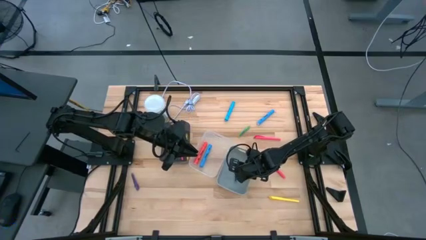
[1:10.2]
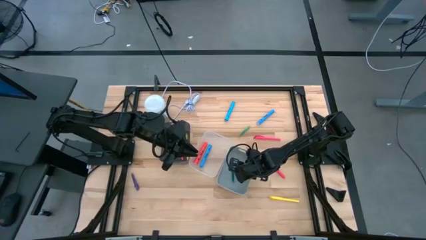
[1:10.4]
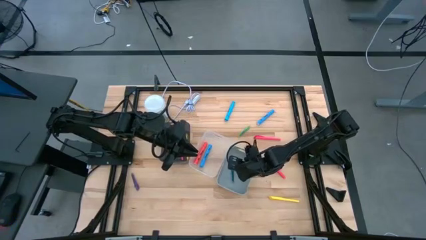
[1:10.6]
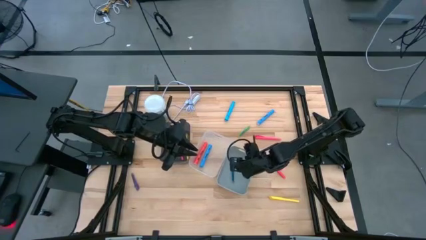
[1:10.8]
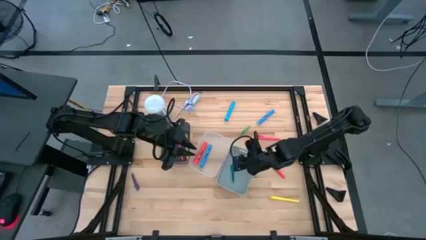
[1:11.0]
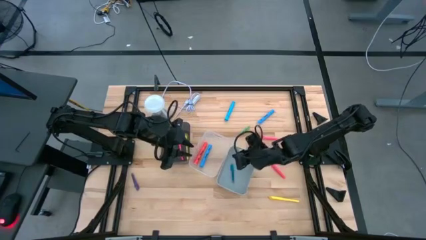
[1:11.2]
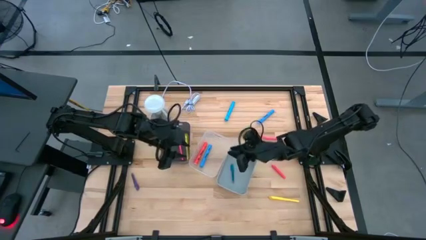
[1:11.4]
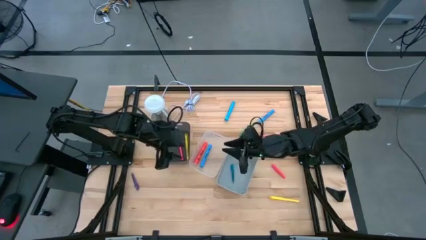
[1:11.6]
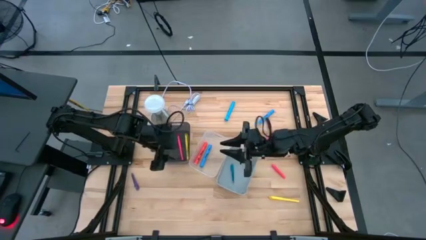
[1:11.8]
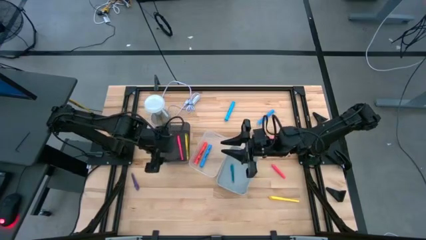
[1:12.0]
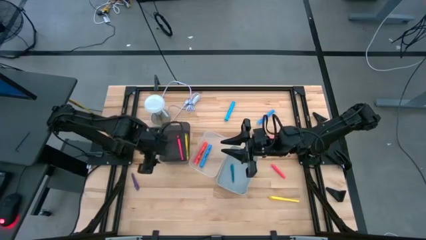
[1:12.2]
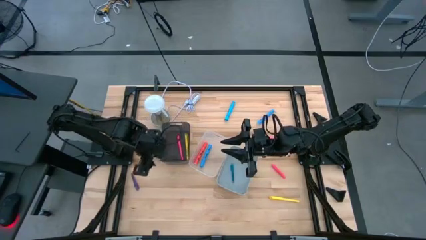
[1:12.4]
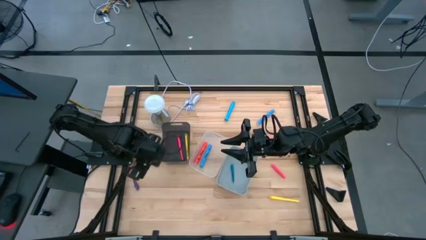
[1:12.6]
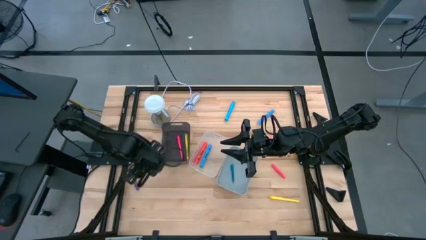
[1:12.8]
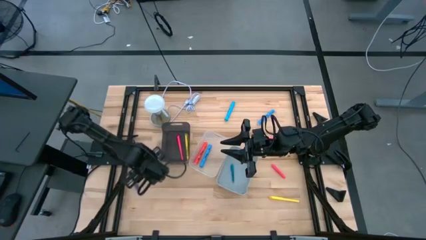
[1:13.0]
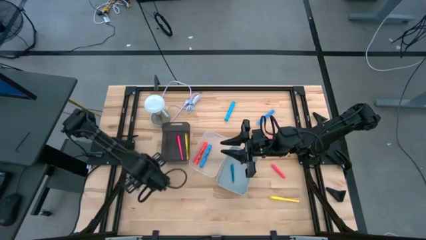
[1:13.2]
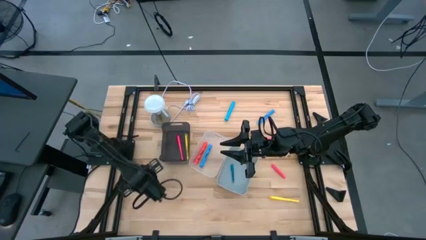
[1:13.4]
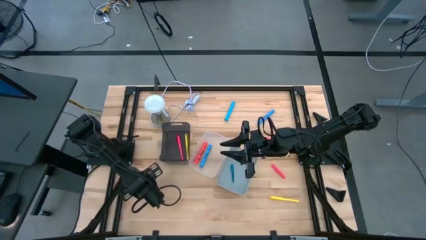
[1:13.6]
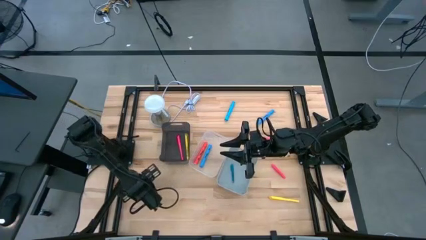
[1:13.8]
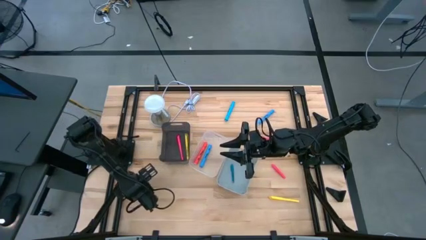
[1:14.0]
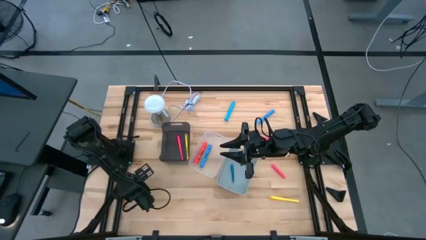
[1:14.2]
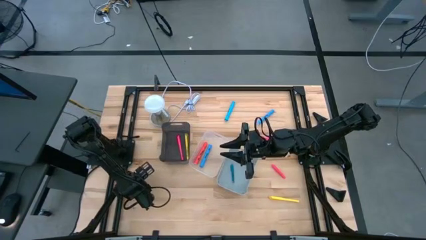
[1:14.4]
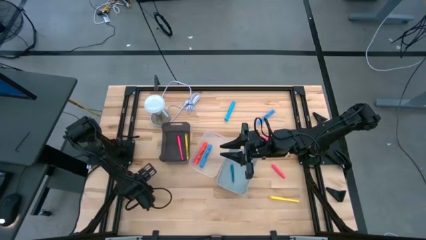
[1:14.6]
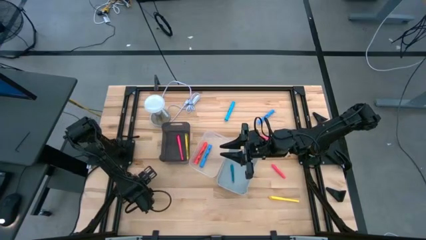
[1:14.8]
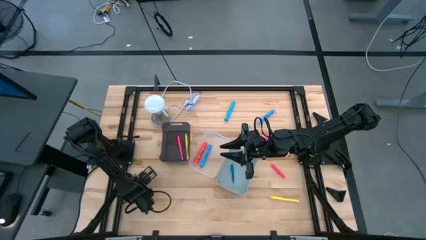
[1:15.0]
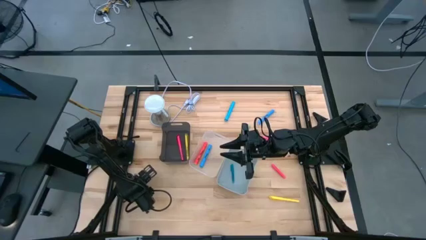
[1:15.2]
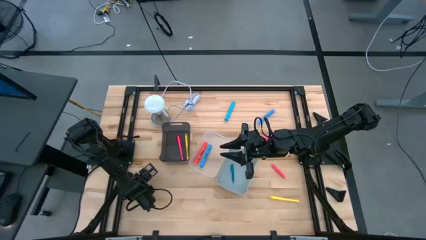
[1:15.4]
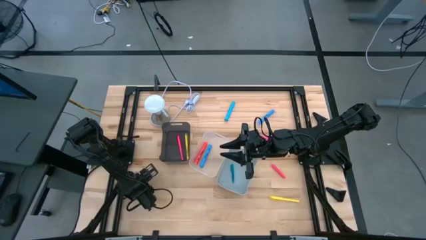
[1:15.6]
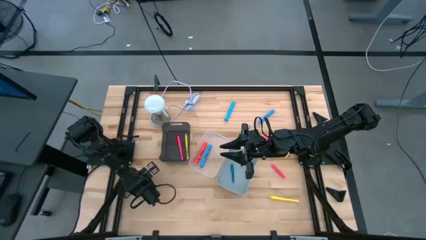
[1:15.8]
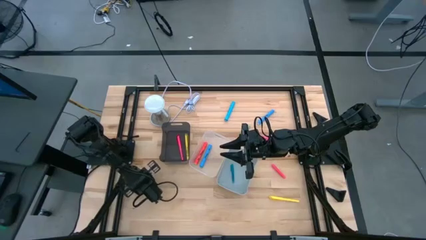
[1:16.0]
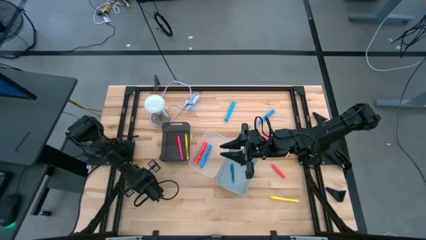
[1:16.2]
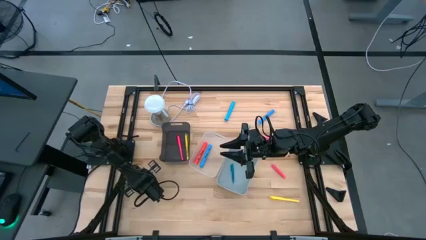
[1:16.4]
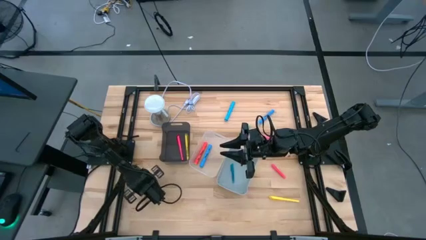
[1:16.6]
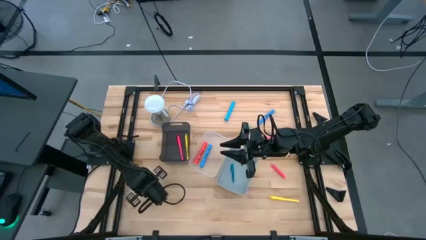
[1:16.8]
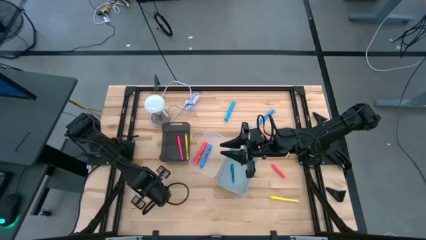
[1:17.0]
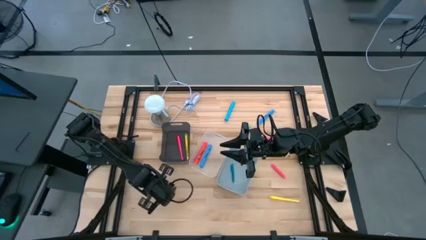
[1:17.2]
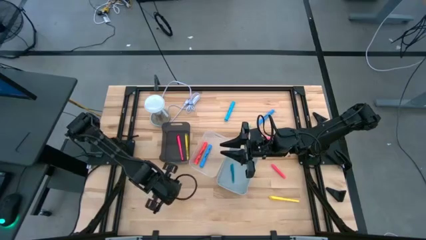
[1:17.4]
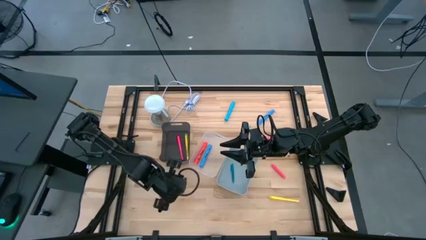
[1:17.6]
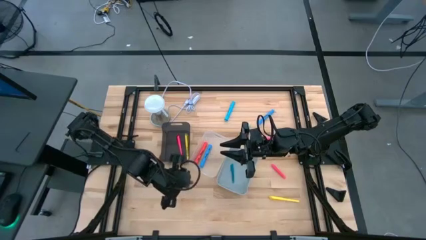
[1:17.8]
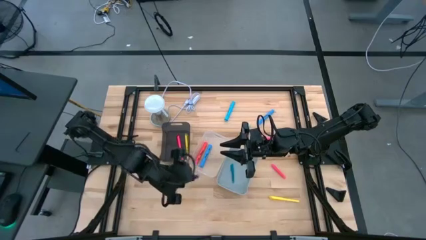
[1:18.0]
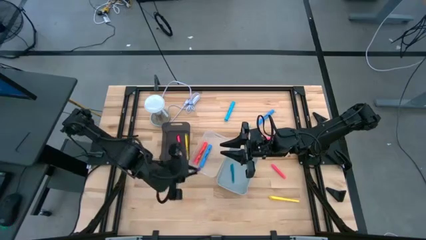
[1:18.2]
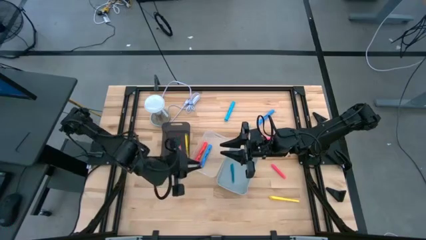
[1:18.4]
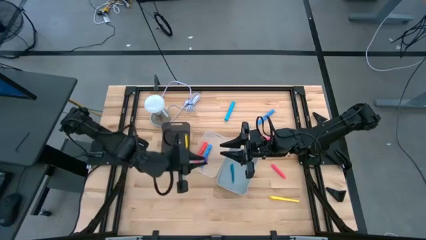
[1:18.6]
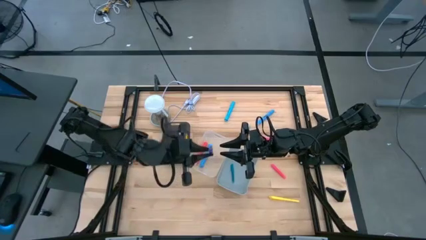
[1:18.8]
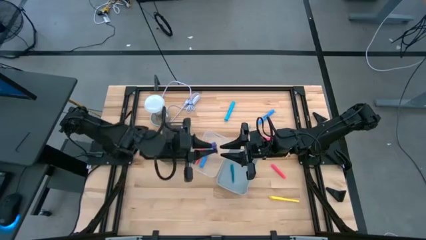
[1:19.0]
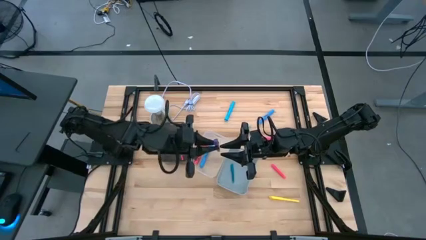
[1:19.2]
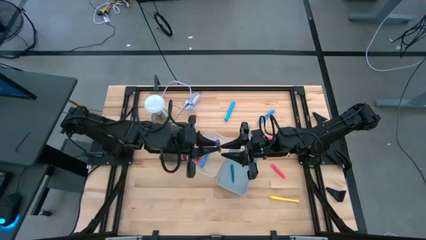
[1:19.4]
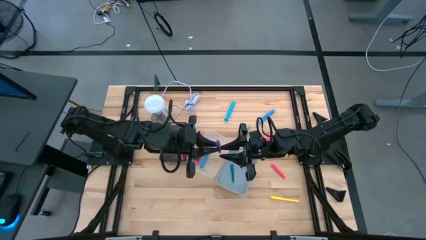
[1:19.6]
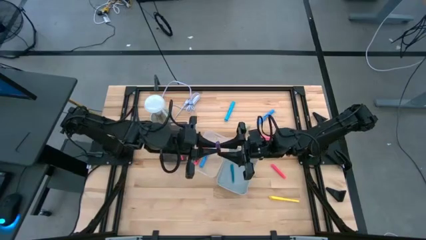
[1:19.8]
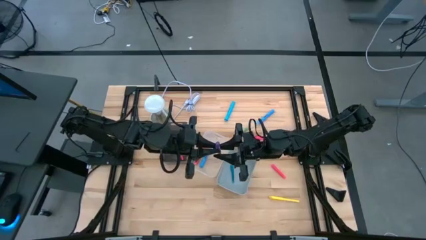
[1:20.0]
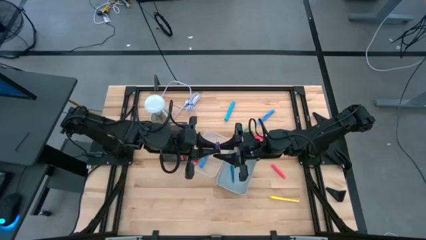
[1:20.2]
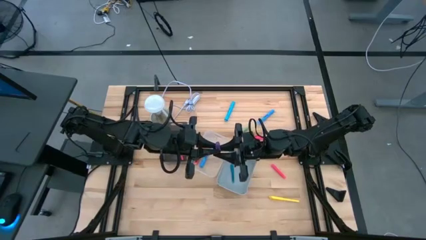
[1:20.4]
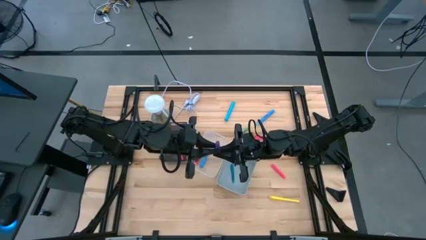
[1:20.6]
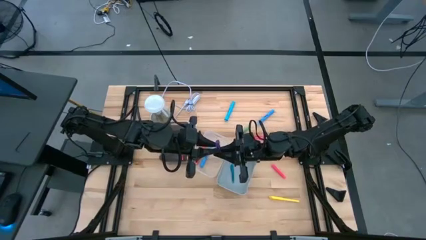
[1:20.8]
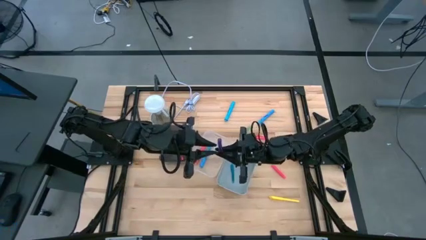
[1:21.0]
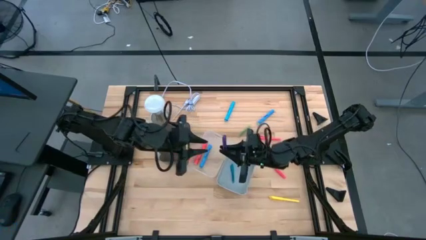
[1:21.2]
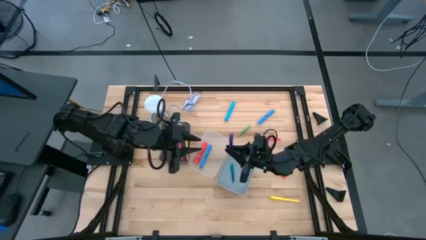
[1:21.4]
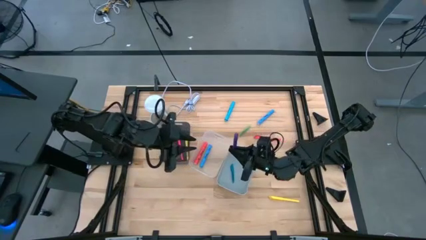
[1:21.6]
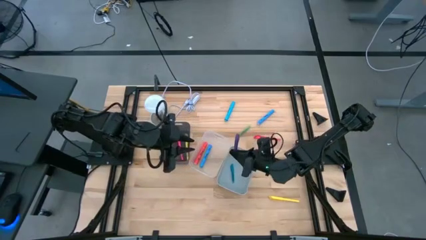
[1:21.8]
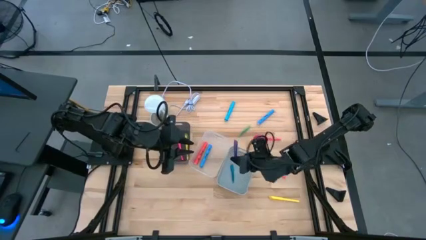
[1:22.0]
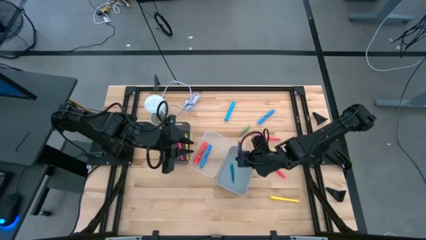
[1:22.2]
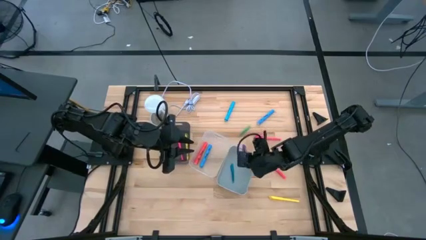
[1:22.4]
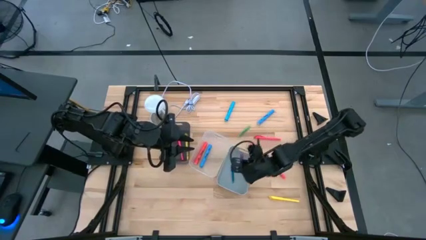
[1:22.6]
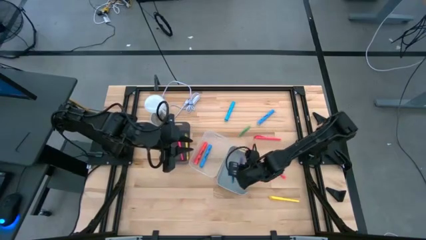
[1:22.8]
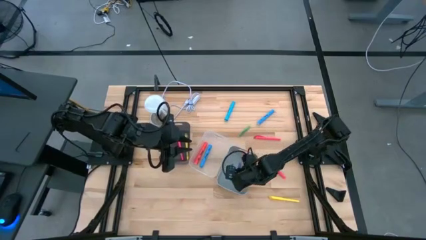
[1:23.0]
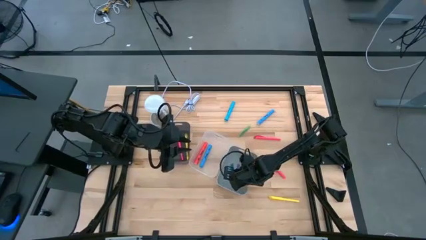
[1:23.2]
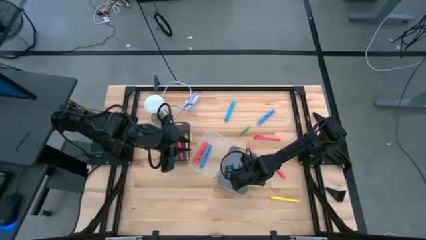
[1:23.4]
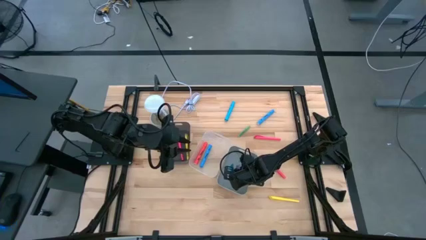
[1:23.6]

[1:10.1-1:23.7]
Task: Pick & Place Markers
Put the purple pen into the gray bin

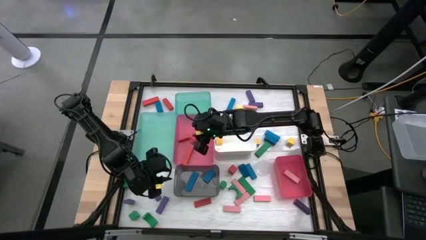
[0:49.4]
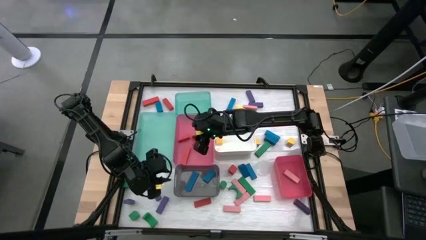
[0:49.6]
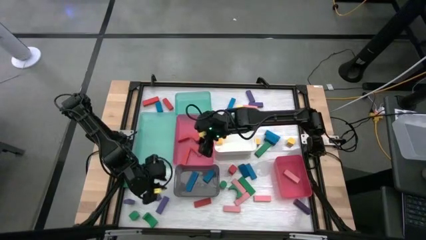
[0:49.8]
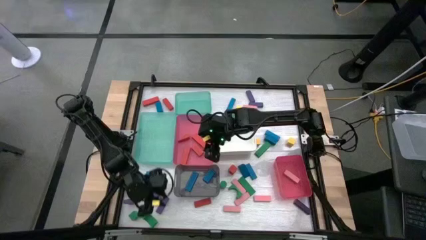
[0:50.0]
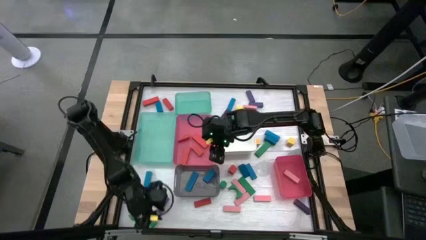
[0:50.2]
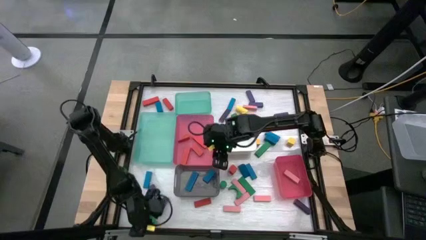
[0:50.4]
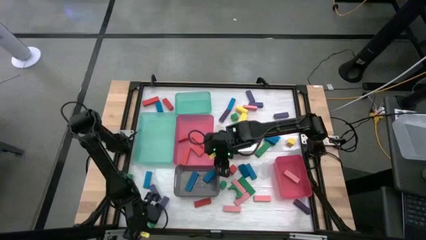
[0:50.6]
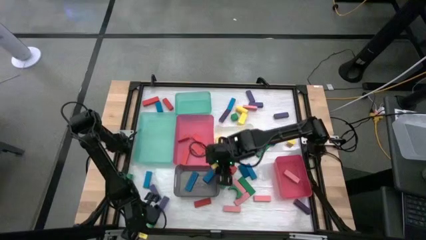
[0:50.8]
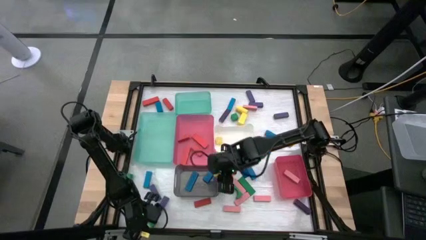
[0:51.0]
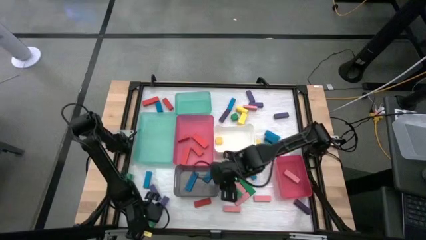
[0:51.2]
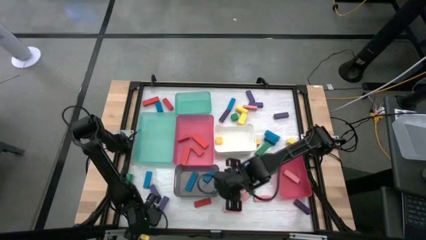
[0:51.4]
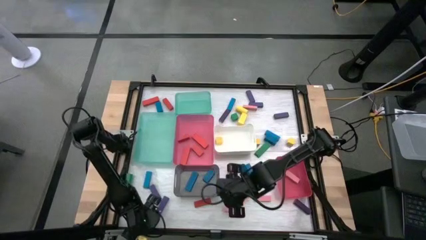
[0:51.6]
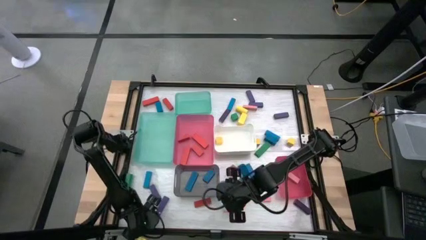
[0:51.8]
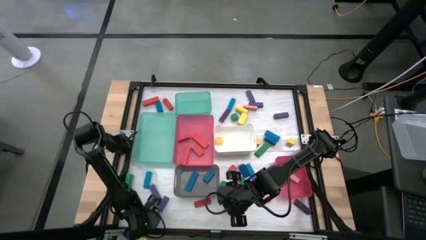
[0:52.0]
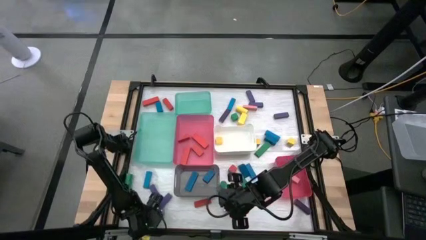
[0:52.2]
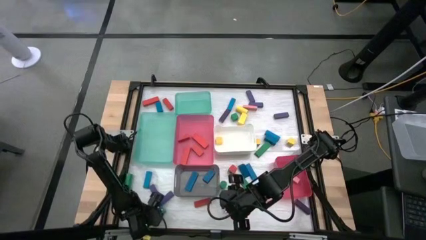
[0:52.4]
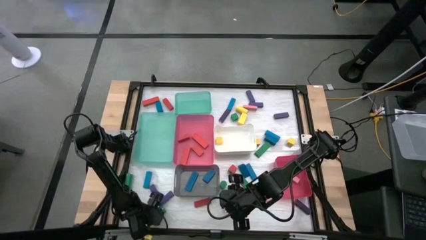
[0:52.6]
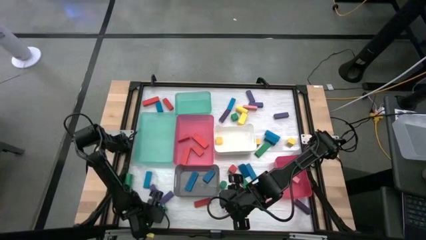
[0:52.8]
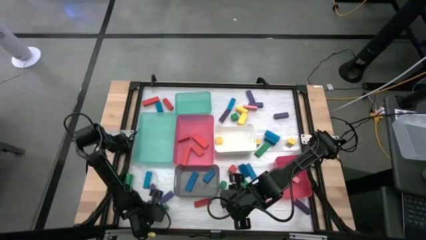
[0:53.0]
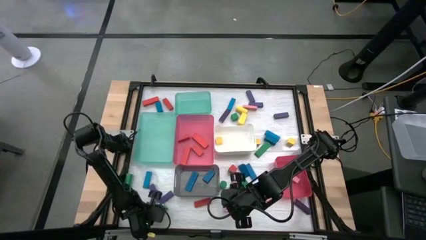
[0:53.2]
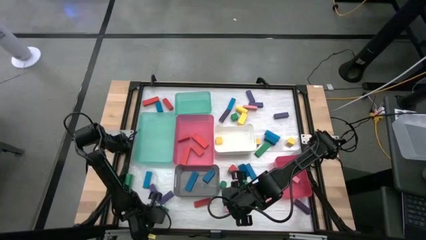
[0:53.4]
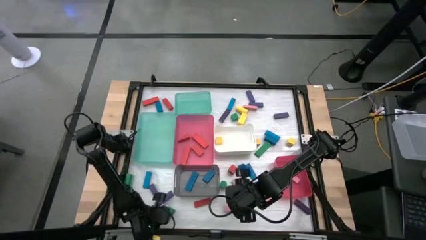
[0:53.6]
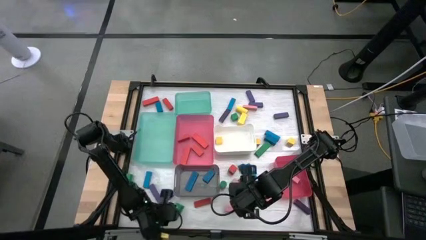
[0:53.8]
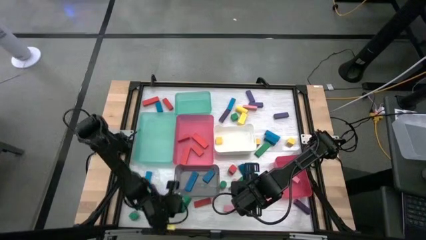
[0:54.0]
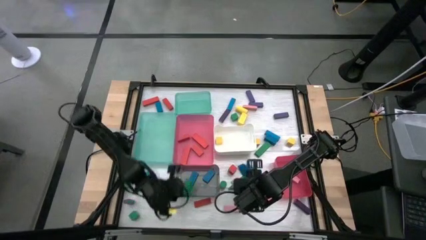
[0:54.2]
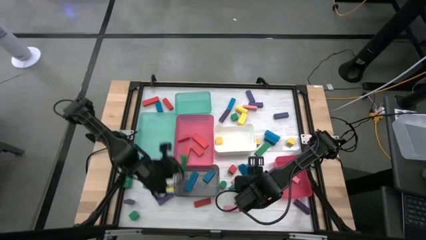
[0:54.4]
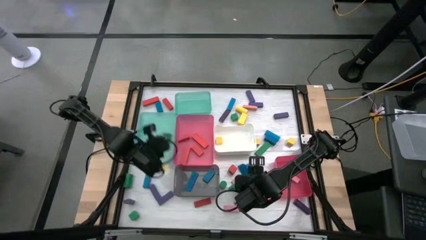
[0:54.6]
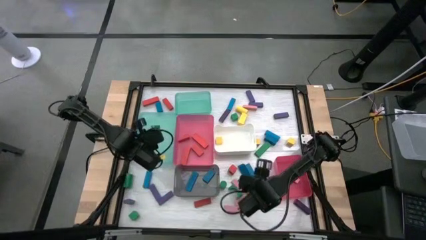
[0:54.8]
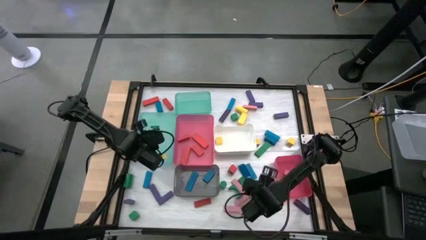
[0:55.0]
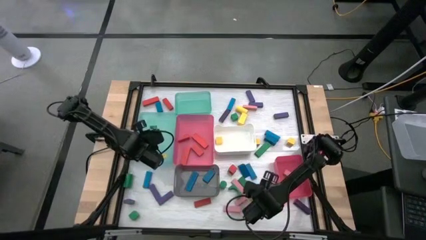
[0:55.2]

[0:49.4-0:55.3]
Task: Sort blocks
Put the green block into the bottom green bin
